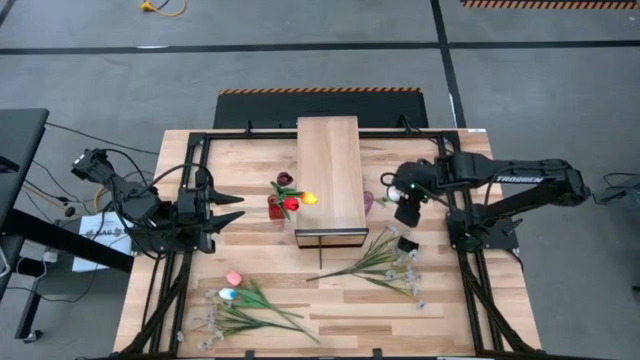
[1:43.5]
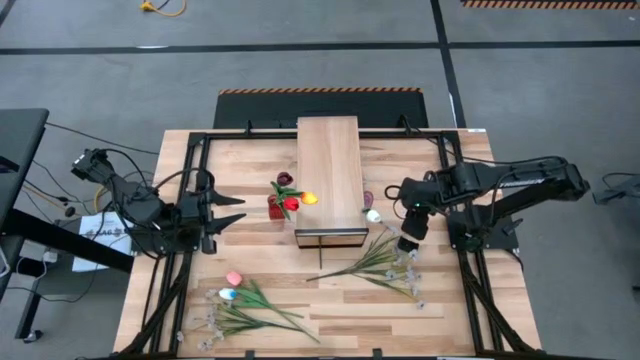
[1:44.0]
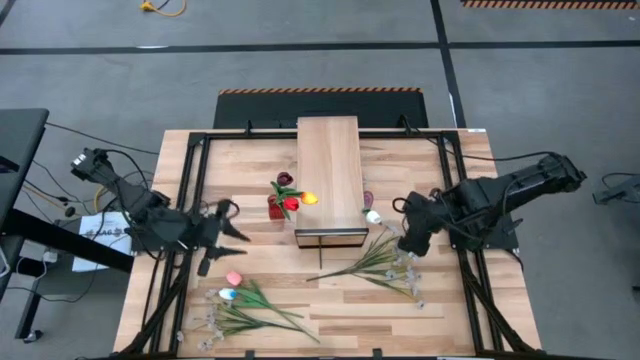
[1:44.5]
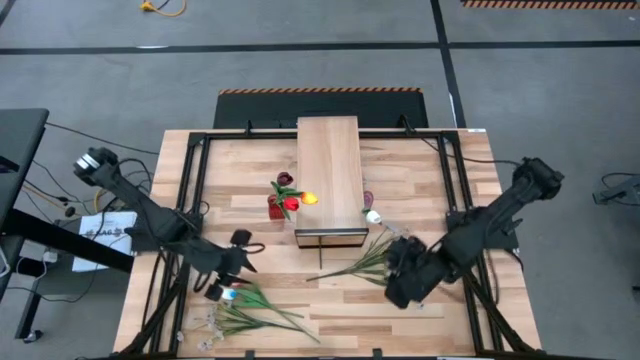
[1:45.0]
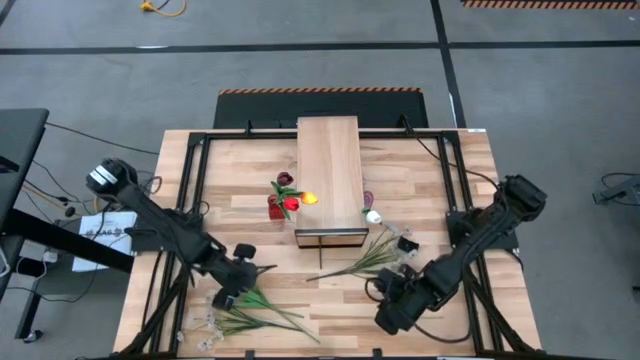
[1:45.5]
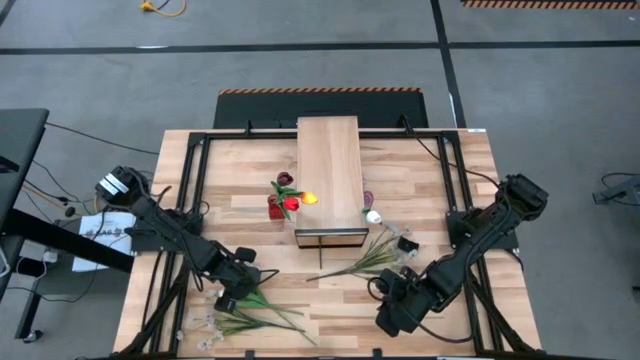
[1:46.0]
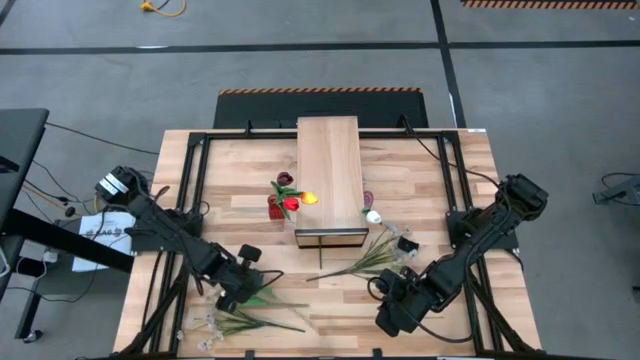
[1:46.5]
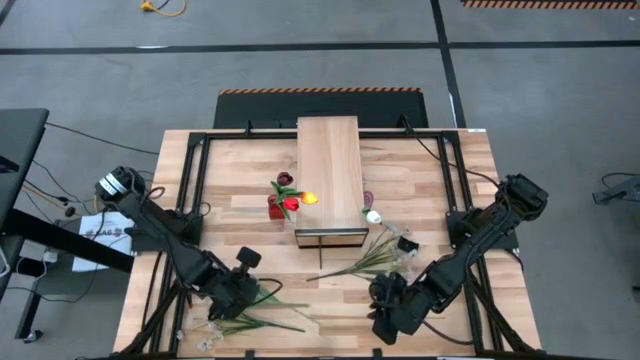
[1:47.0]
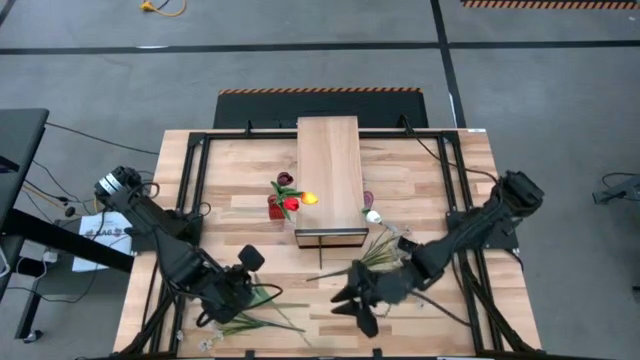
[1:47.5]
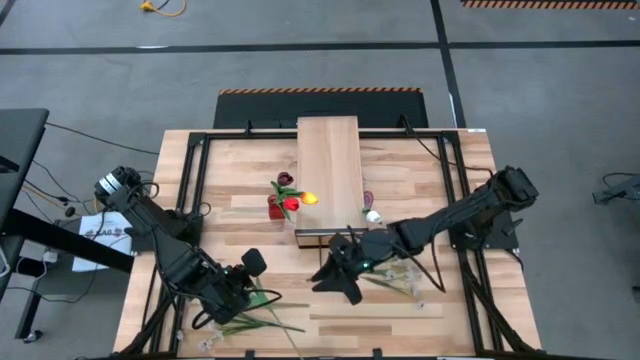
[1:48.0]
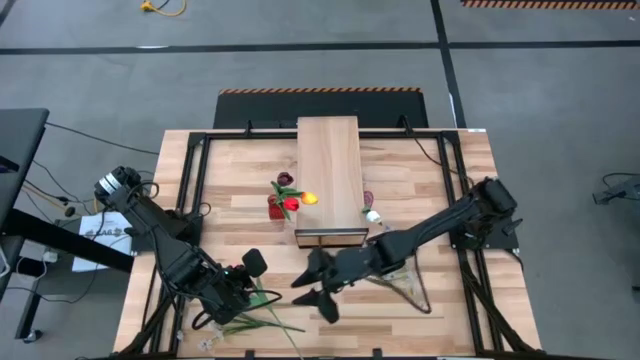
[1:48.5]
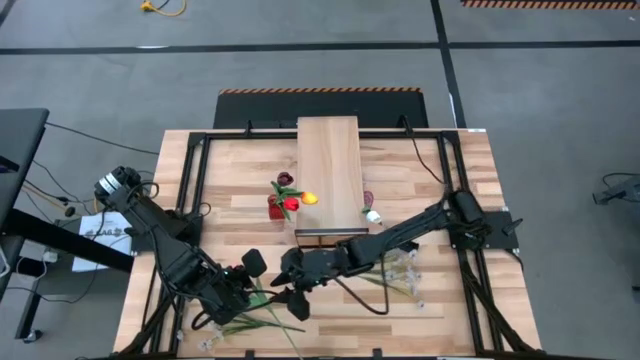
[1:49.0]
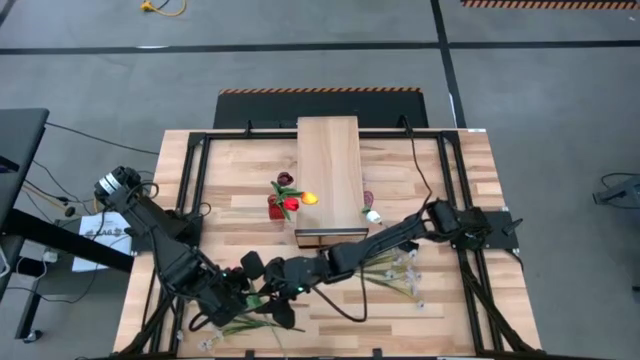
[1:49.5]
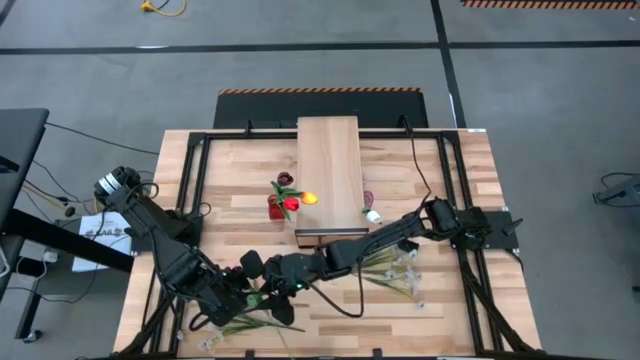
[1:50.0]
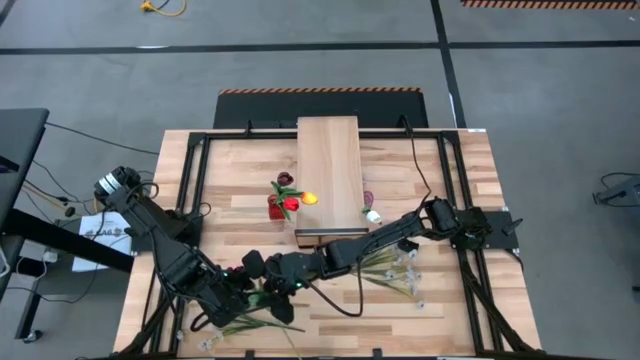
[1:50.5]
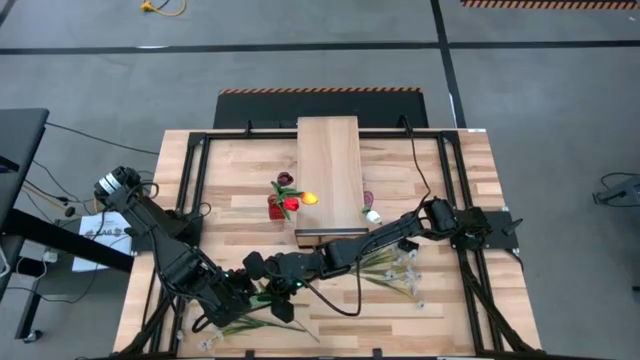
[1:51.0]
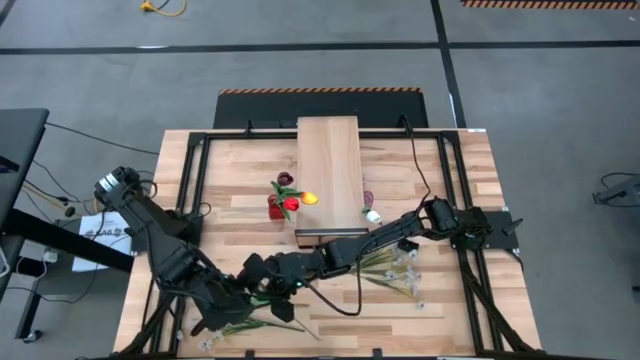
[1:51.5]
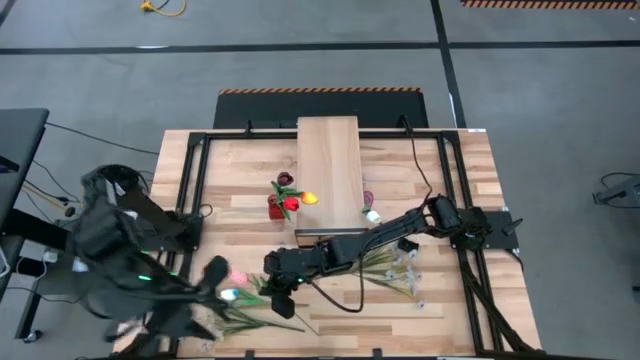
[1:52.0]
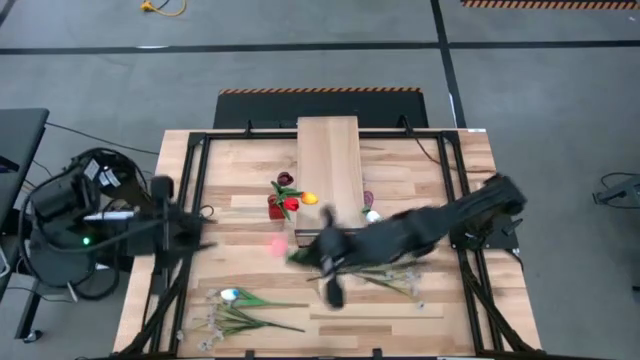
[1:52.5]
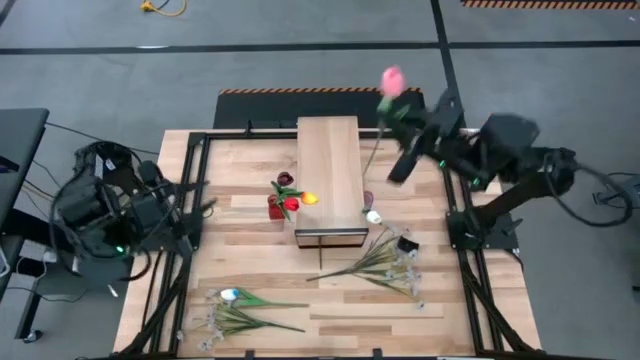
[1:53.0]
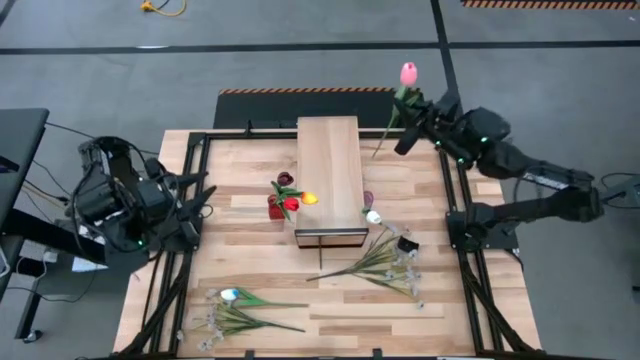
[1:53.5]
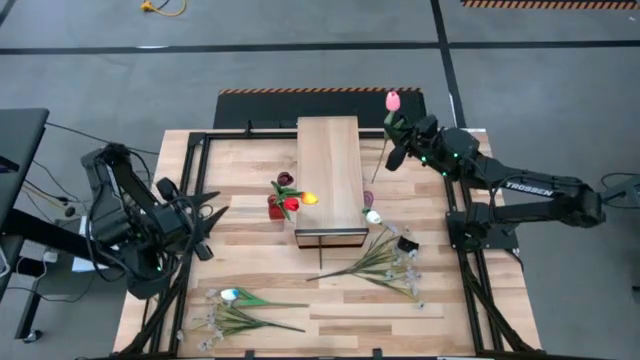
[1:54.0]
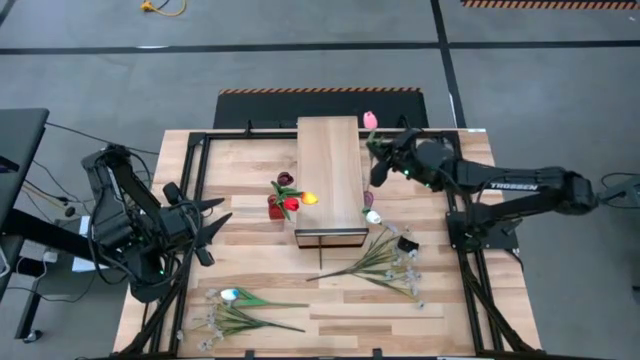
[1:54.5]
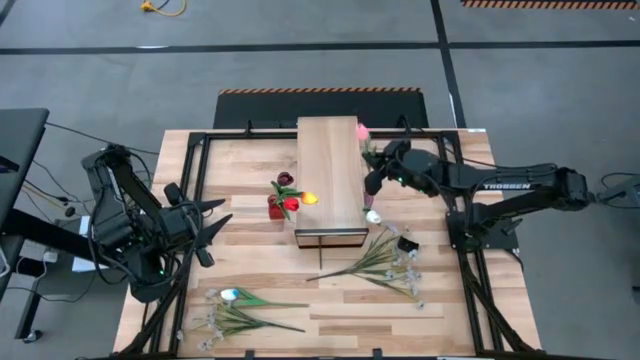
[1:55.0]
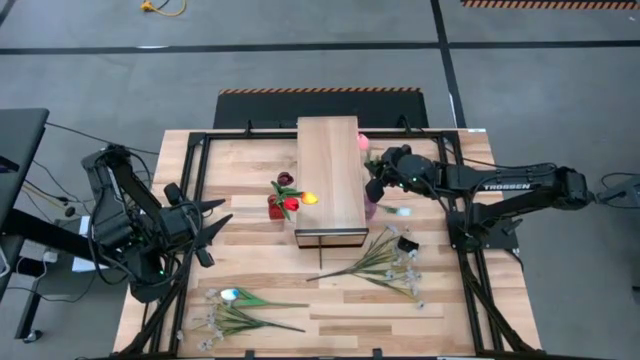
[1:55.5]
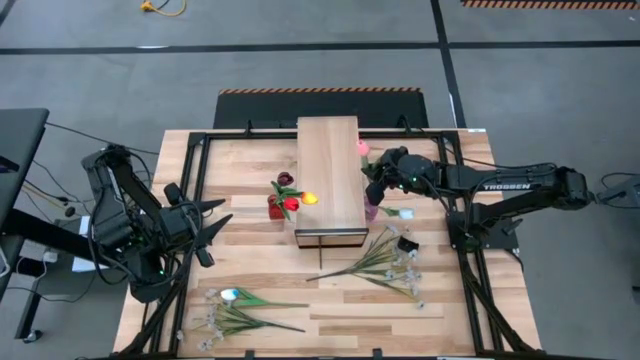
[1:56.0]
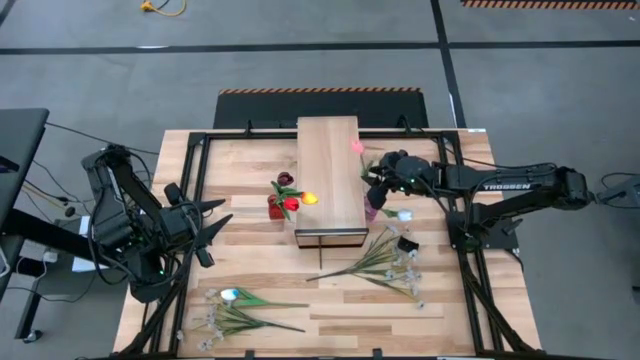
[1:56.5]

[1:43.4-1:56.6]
Task: Pick and place flowers into a vace then onto a shelf
Put the pink tulip into the purple flower vase

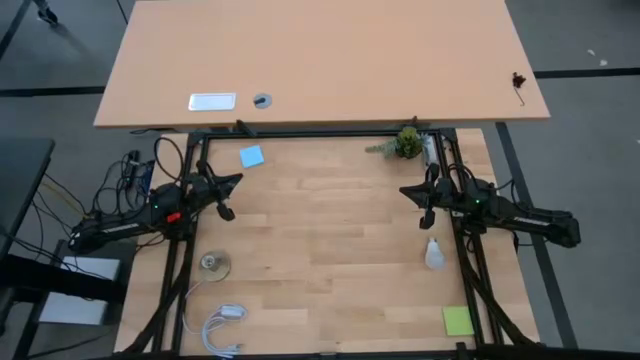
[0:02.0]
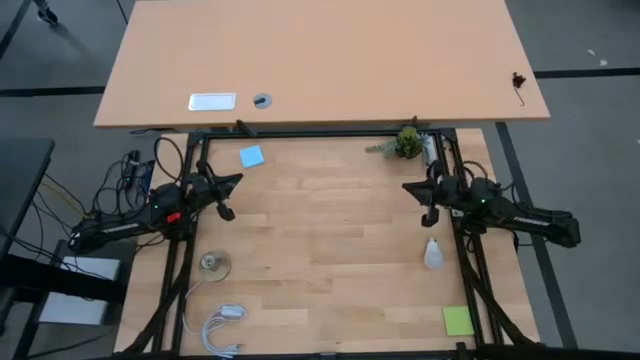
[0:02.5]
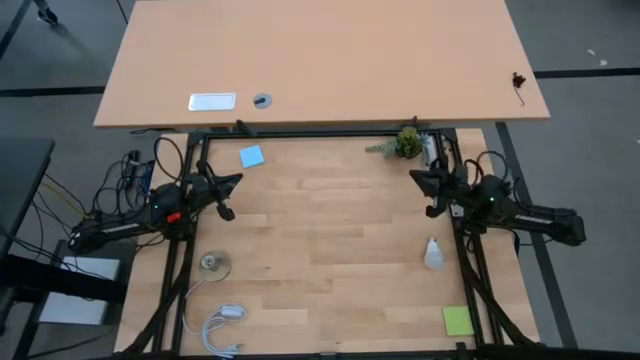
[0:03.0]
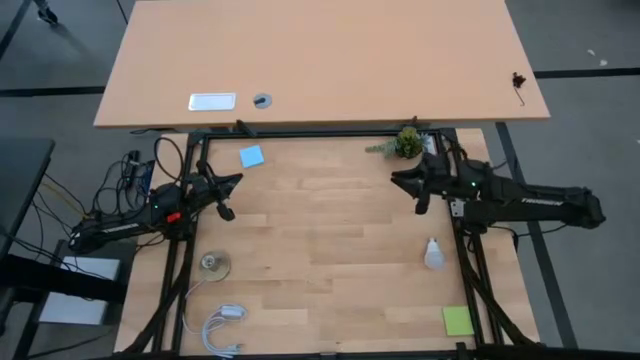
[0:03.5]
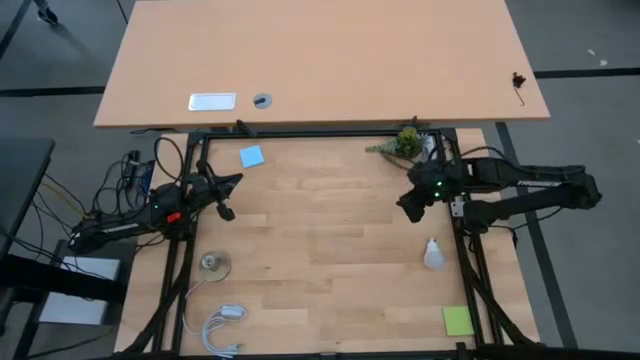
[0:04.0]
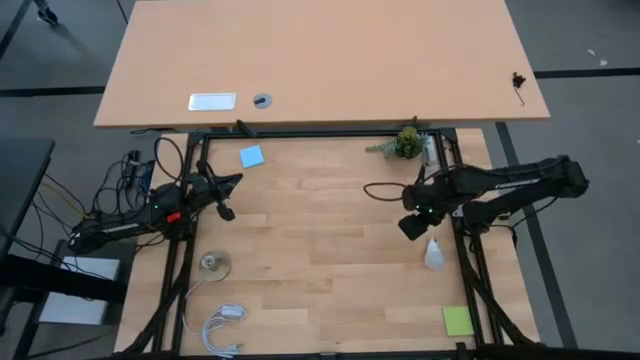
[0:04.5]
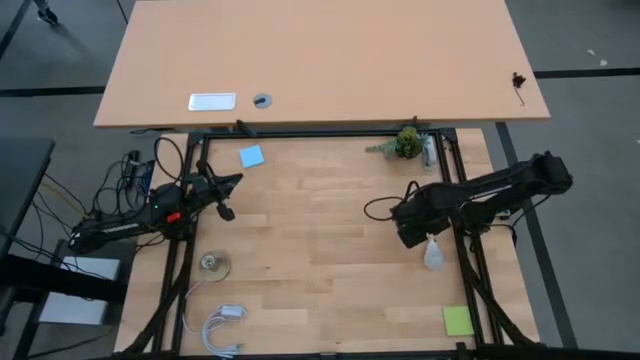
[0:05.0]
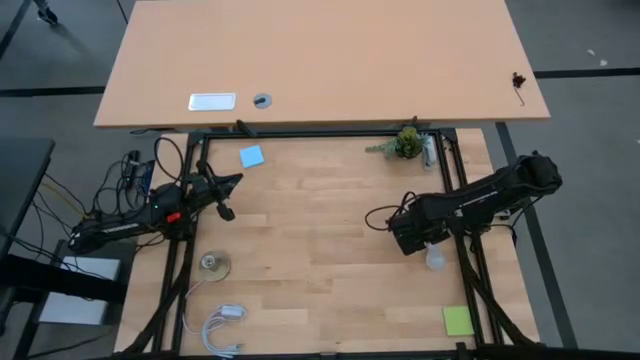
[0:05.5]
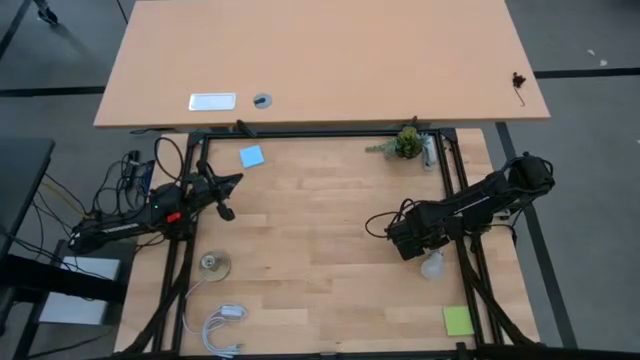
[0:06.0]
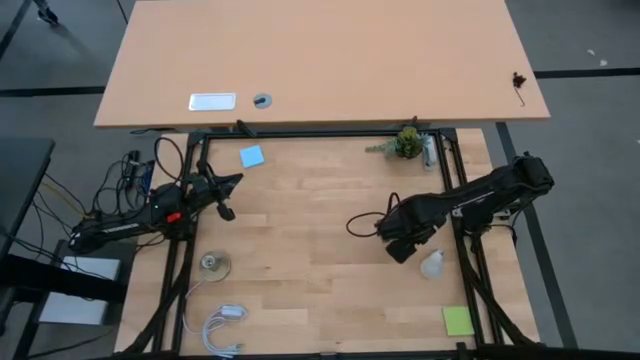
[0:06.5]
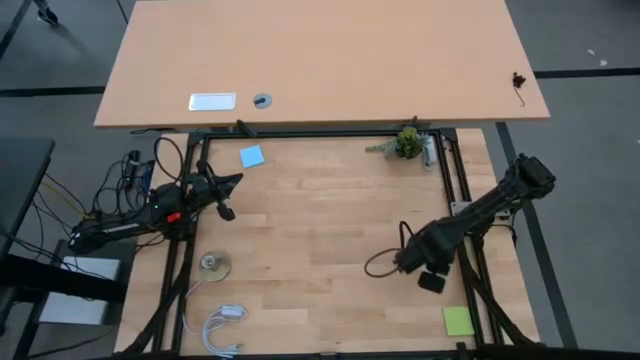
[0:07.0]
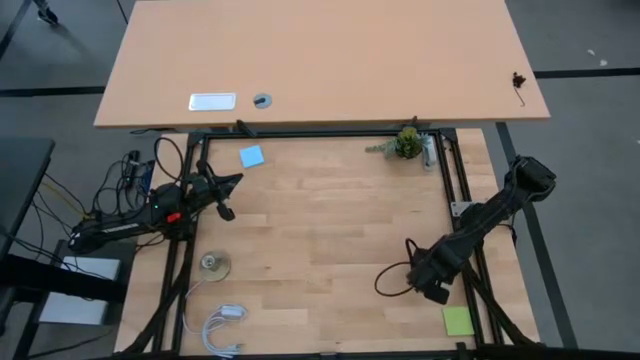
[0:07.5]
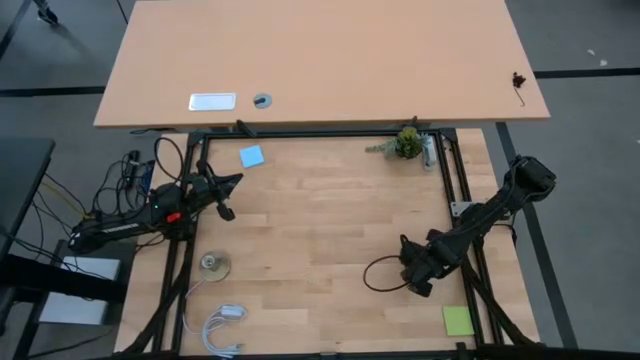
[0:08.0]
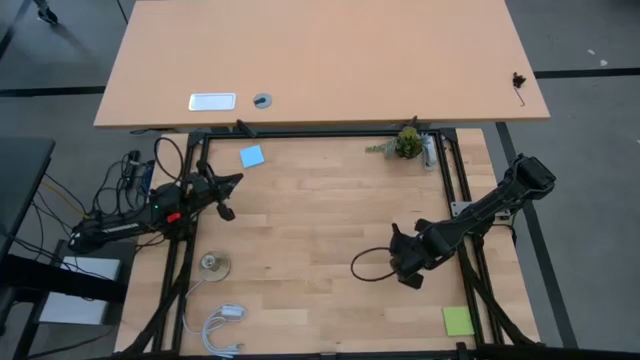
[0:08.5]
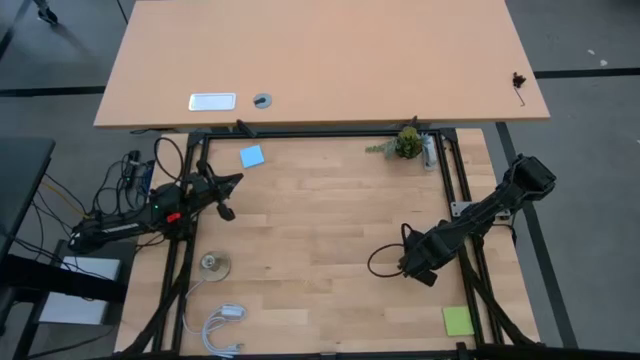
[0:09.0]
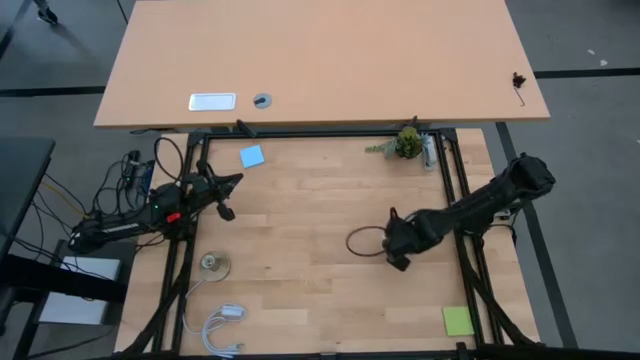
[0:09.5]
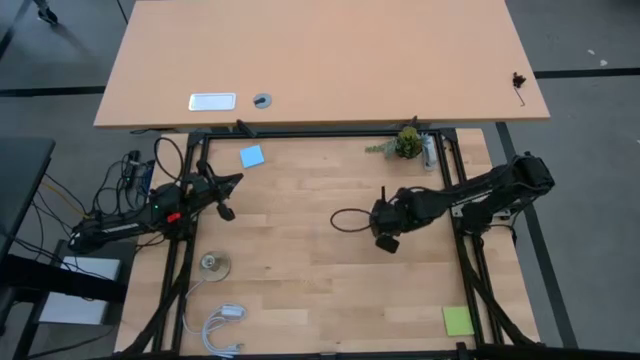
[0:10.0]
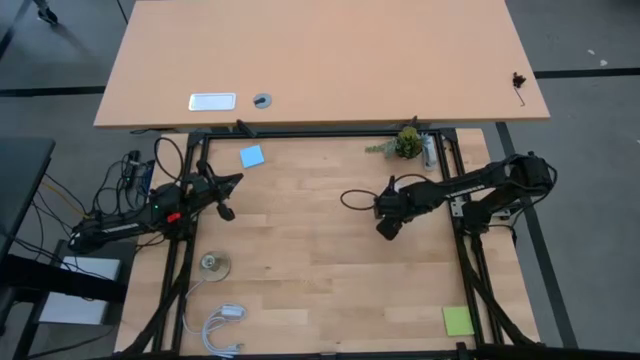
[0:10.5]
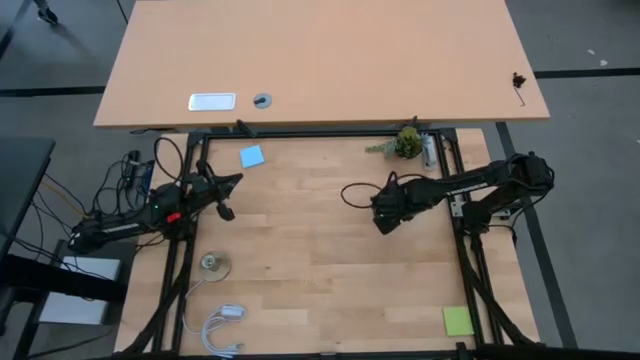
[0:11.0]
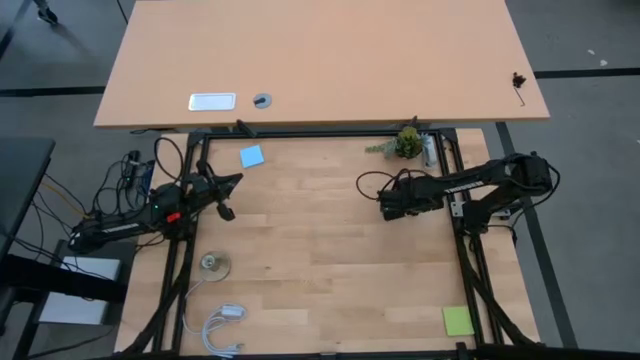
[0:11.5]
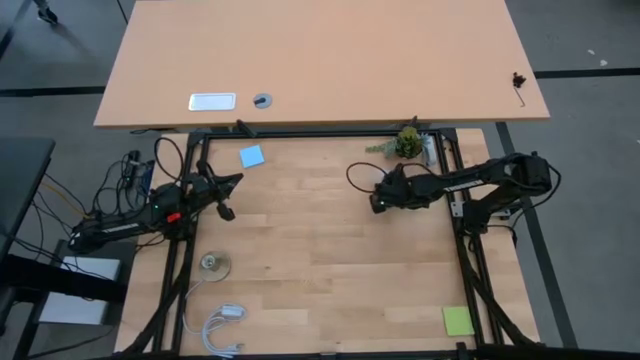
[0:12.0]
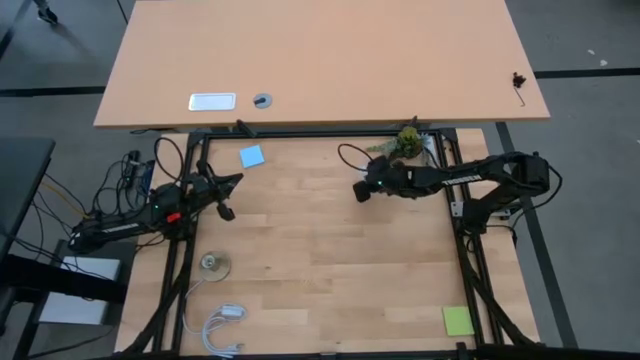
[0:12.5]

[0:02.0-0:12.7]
Task: Screw lightbulb
Insert the light bulb into the lamp
